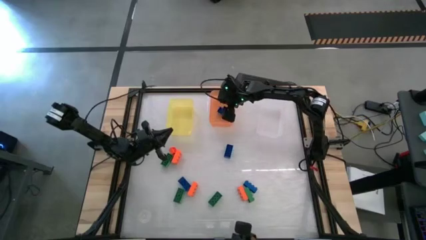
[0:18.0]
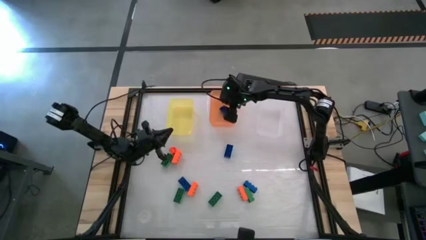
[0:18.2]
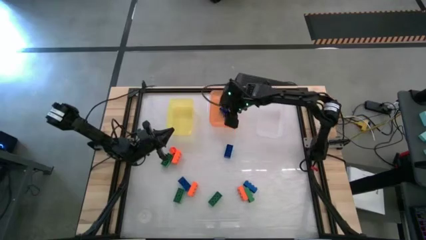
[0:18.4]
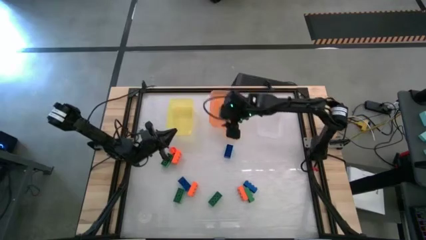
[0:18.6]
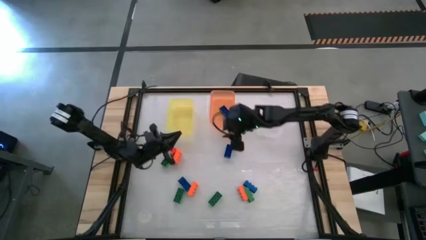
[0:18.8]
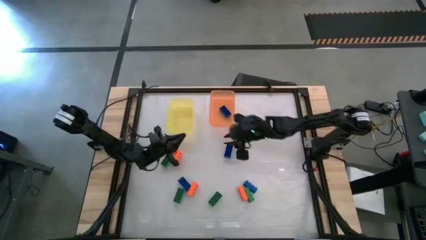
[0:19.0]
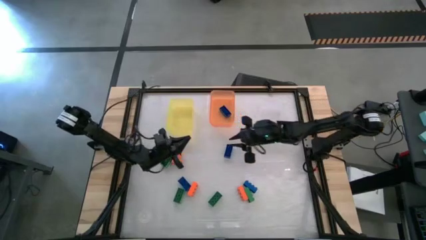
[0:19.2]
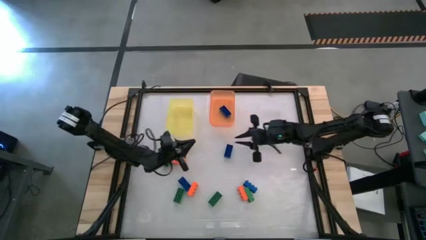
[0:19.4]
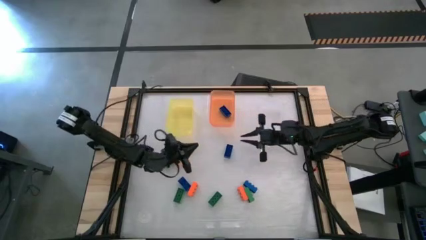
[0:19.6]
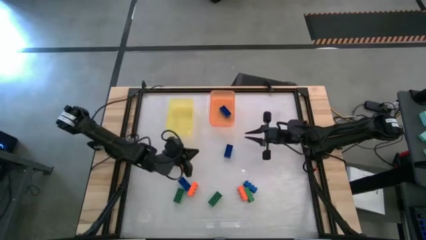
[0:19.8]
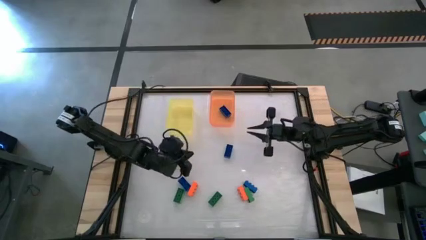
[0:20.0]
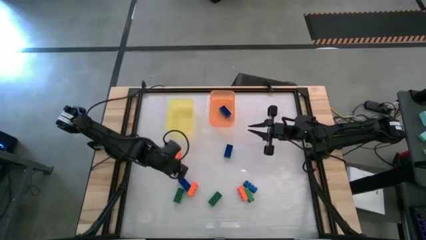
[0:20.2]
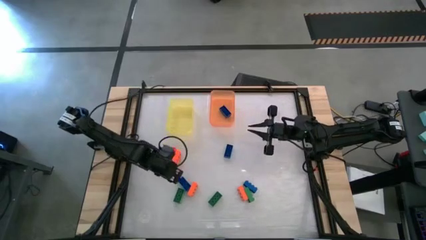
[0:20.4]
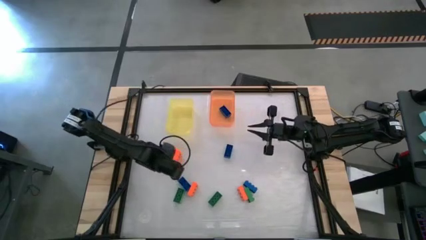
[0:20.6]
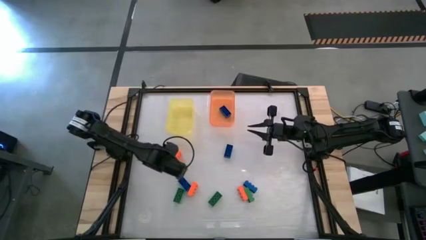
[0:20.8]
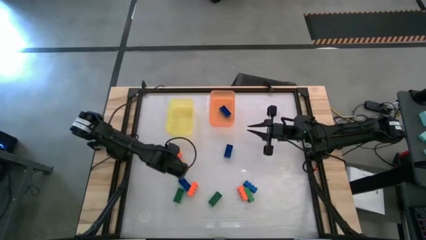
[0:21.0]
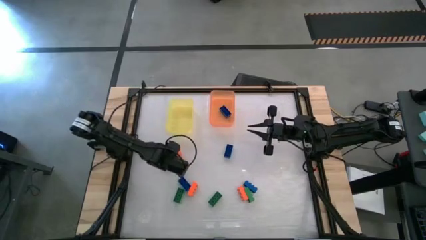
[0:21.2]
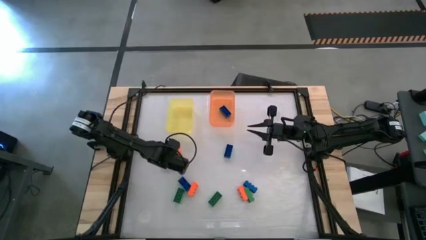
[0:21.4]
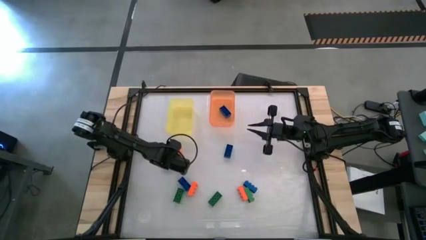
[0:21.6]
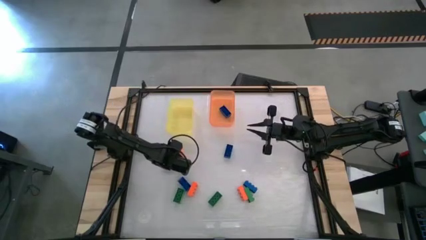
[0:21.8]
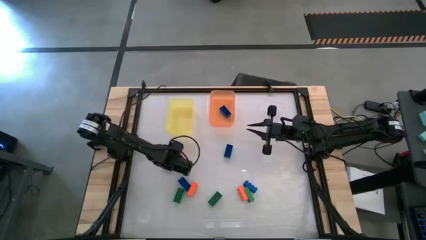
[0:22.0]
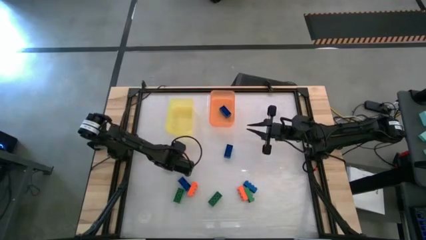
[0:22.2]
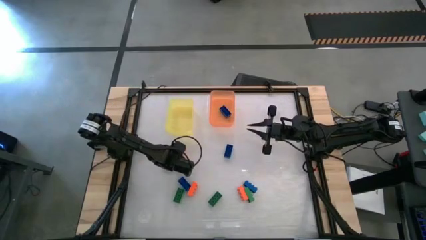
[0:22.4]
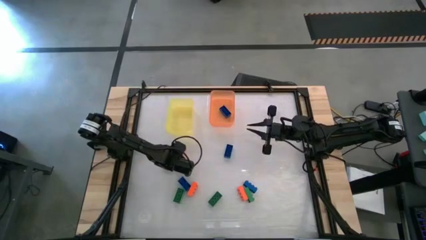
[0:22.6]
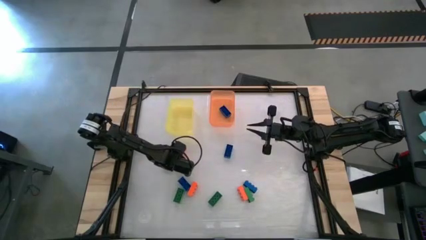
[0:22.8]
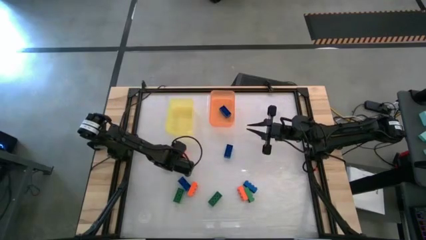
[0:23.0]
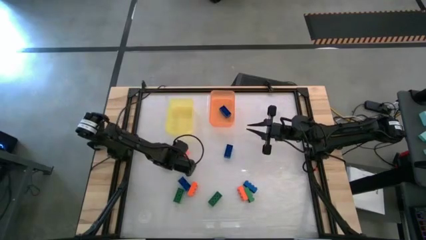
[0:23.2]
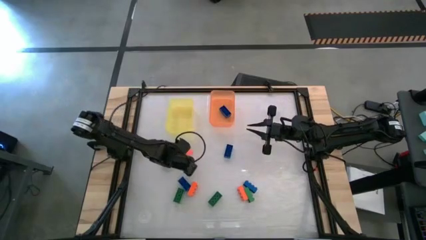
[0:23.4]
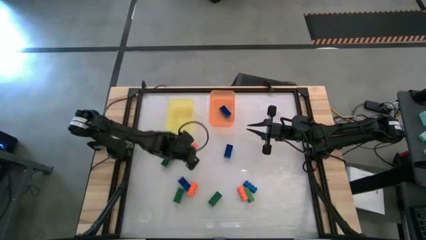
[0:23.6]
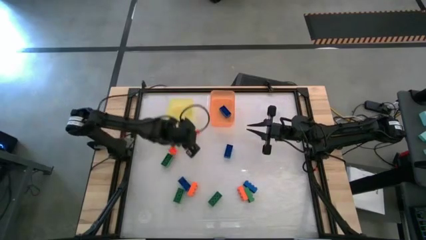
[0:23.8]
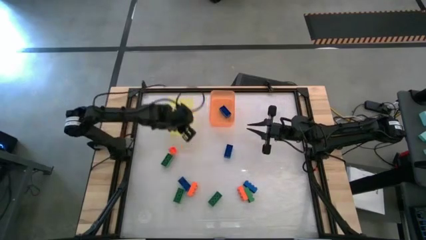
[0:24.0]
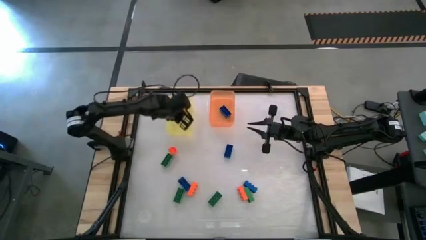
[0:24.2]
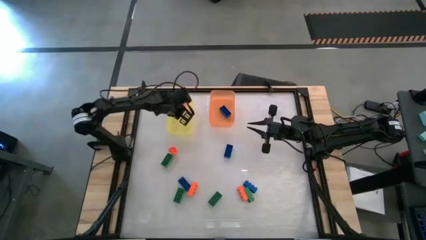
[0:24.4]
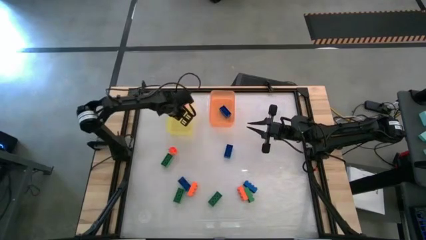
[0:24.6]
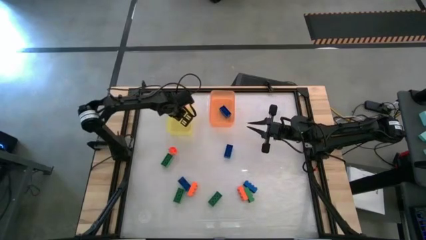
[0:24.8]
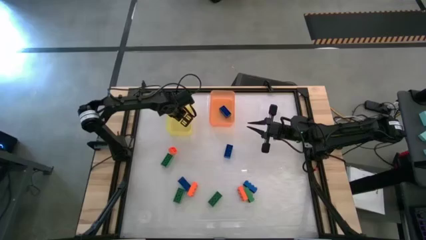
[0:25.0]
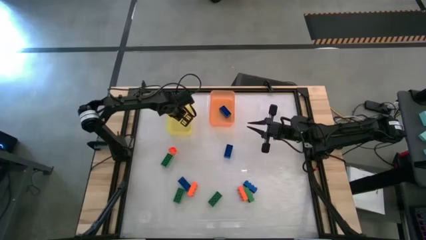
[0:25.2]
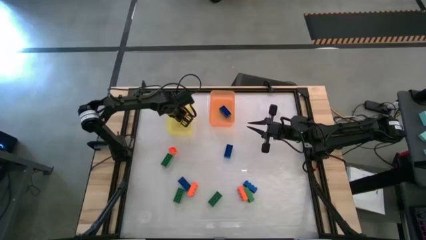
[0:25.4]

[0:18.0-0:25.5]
Task: Sort & place blocks by color
Put the orange game piece into the yellow bin

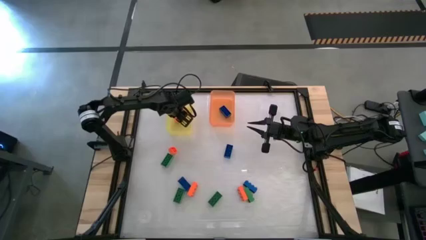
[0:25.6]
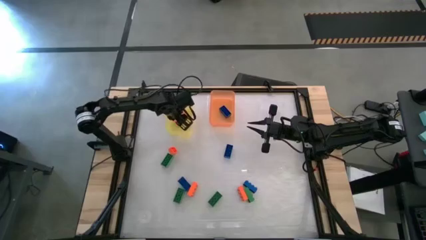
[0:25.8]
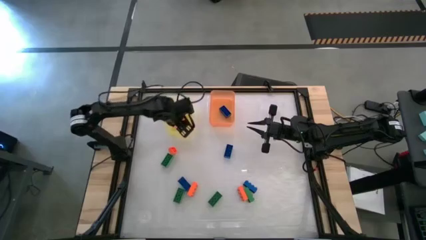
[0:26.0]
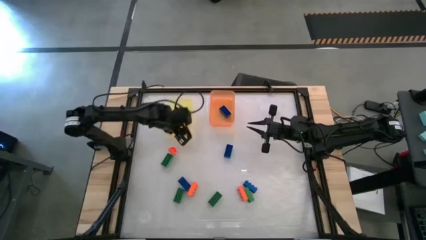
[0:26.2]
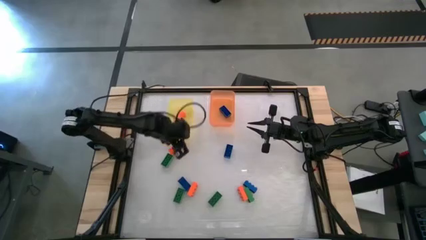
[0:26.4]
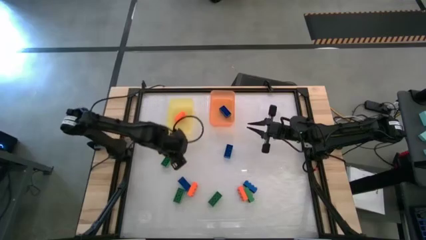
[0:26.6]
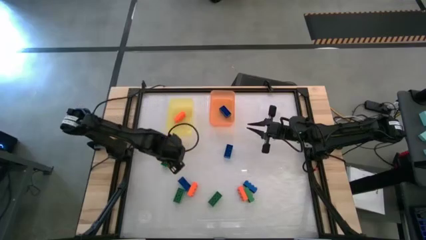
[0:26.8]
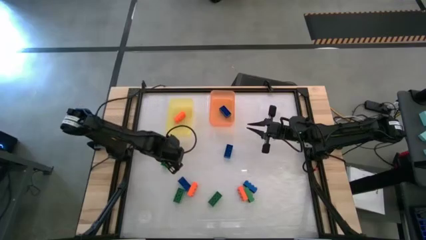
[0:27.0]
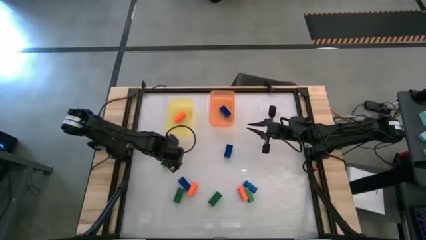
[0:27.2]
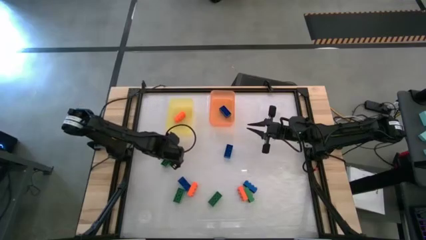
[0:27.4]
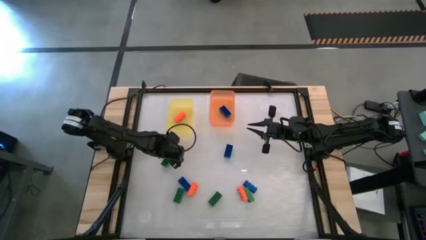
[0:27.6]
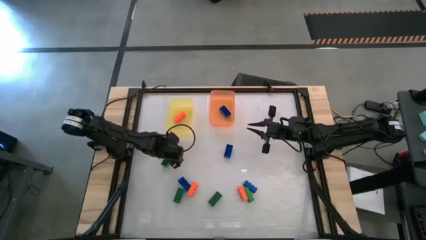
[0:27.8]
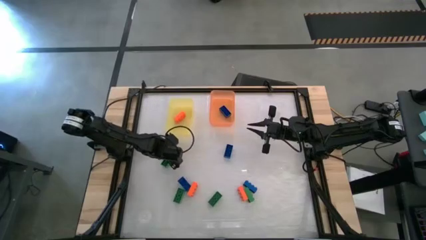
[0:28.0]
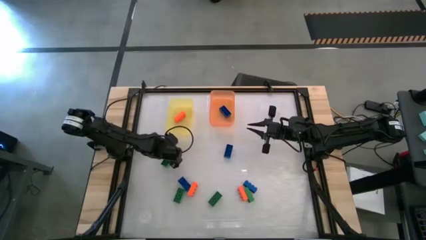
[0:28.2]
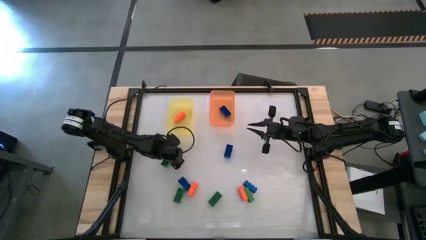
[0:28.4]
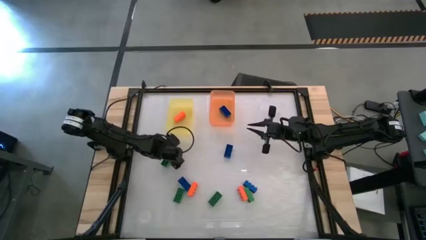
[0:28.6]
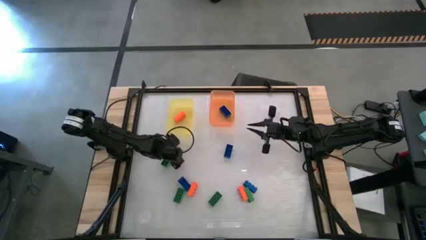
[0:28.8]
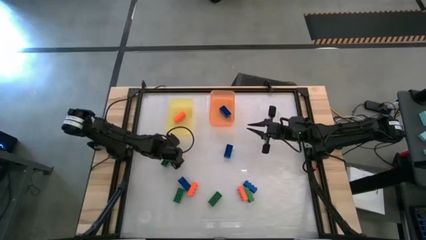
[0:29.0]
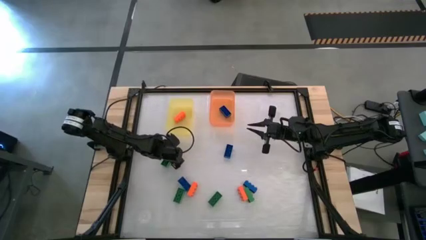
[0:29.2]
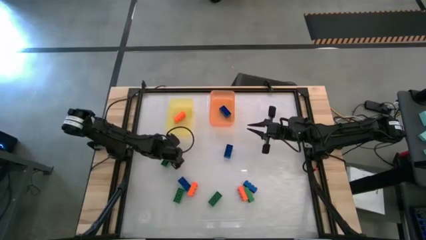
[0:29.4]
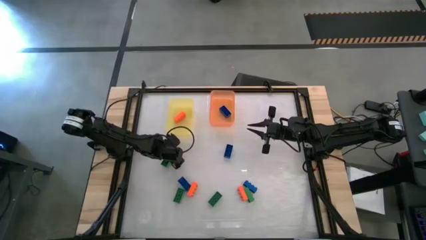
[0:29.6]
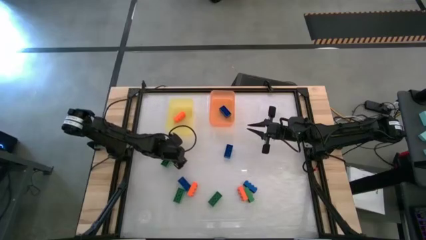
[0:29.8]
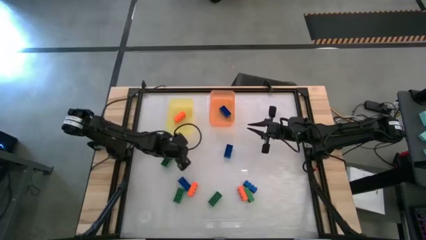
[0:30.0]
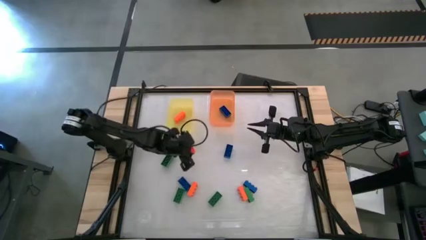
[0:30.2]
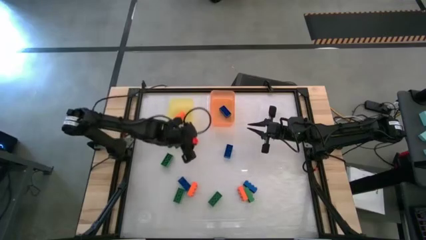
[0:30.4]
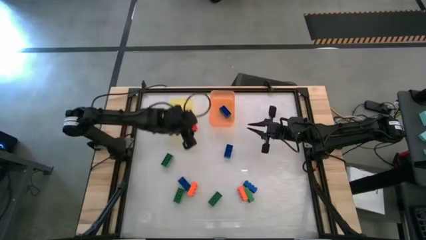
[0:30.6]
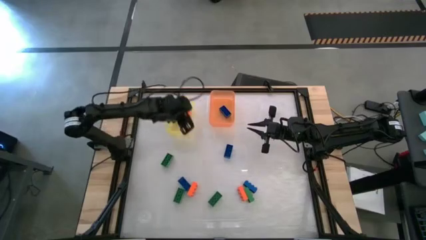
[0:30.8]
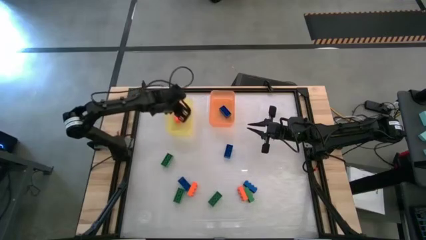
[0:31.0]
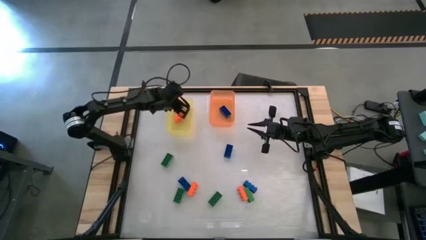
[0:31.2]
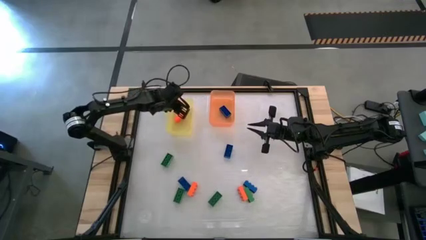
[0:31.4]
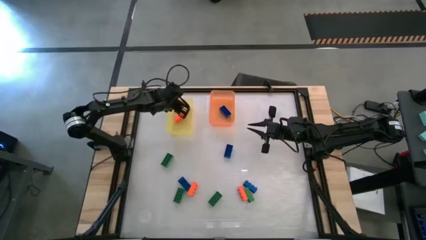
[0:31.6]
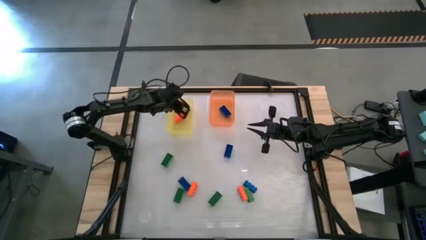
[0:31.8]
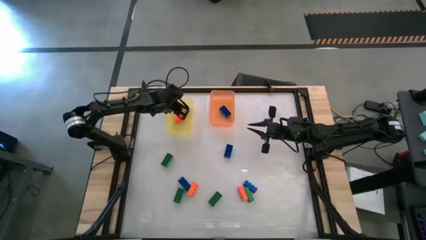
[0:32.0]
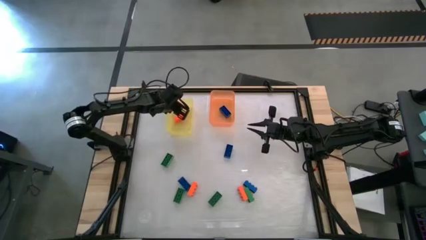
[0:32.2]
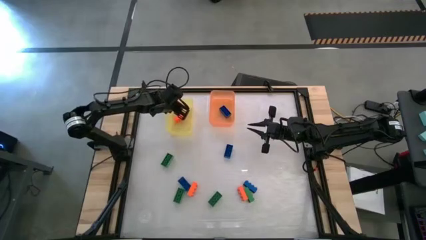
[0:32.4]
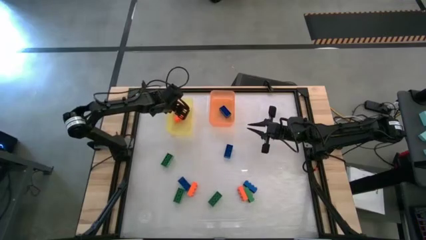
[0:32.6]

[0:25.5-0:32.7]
Put the orange game piece into the yellow bin
